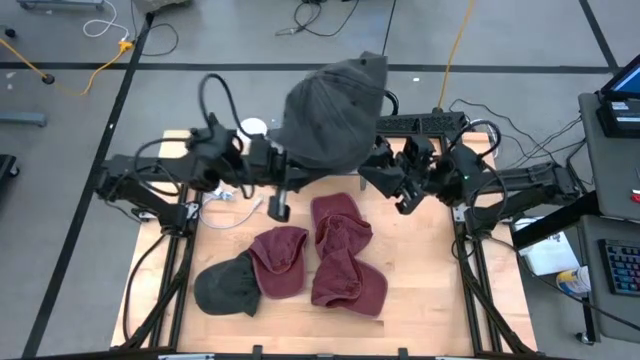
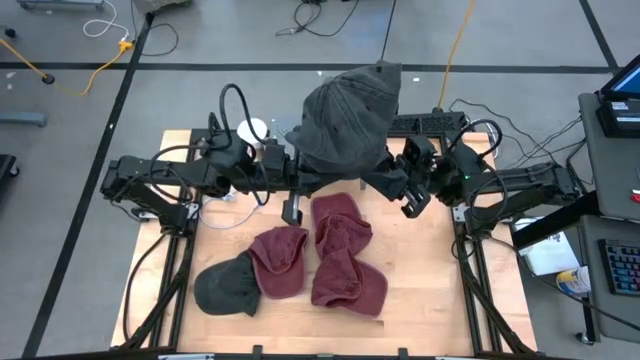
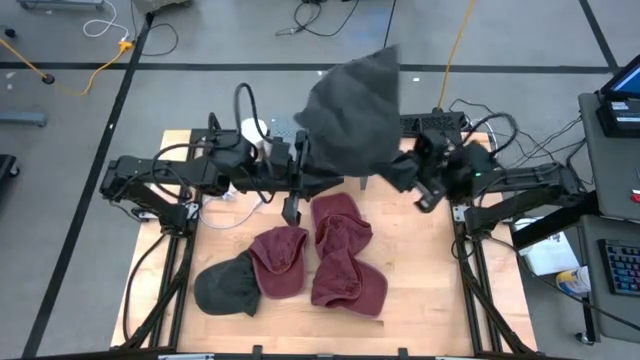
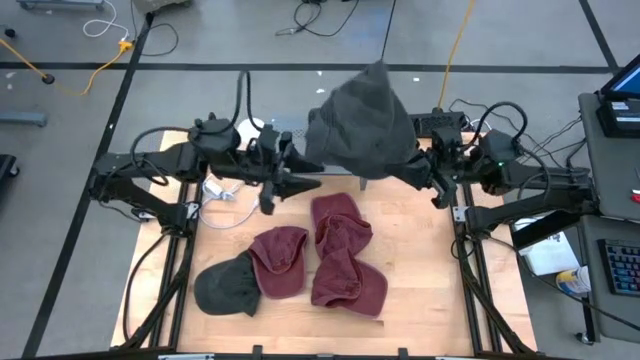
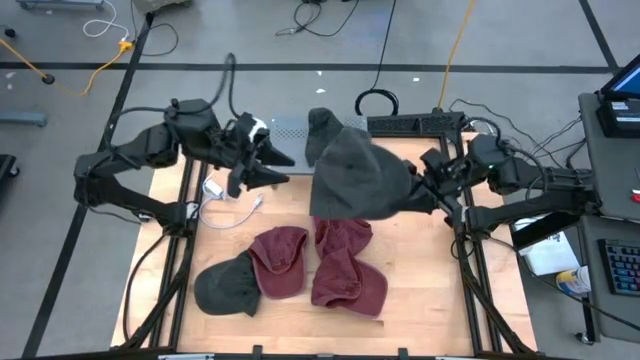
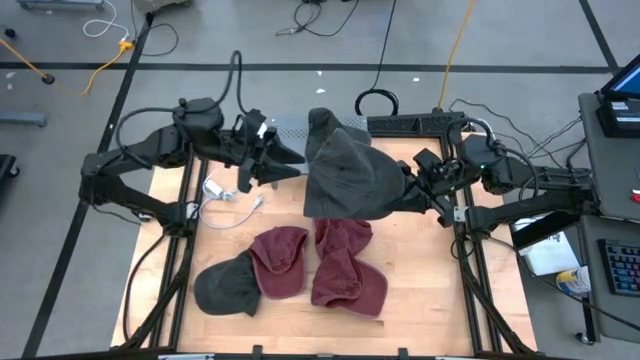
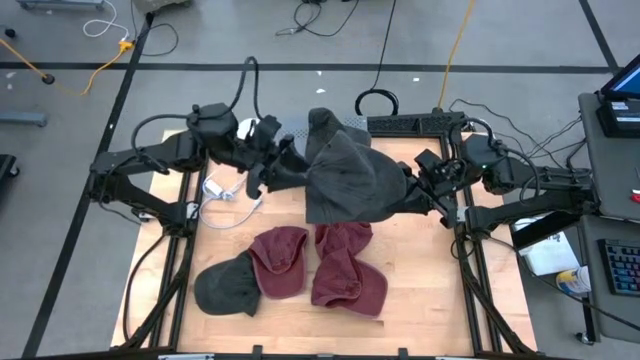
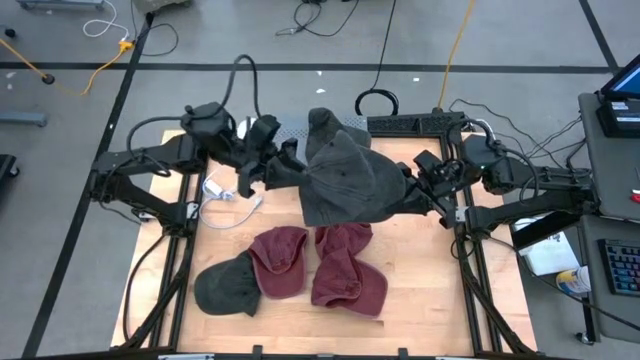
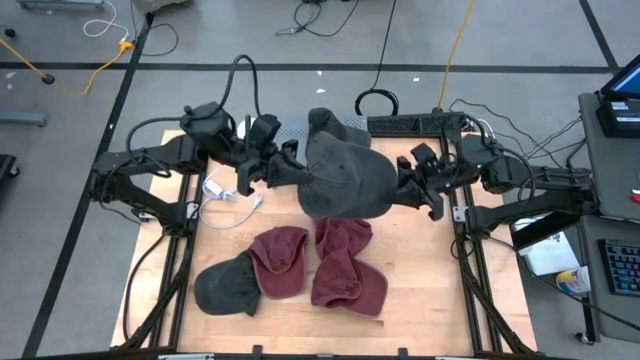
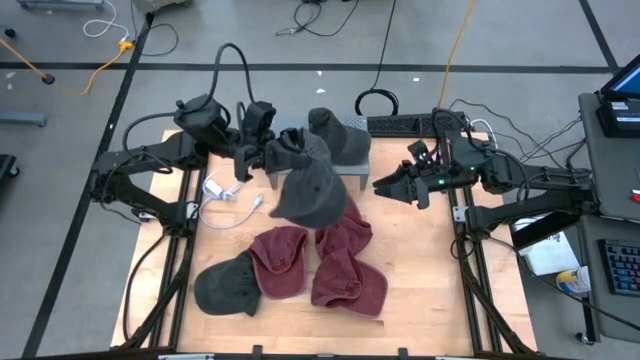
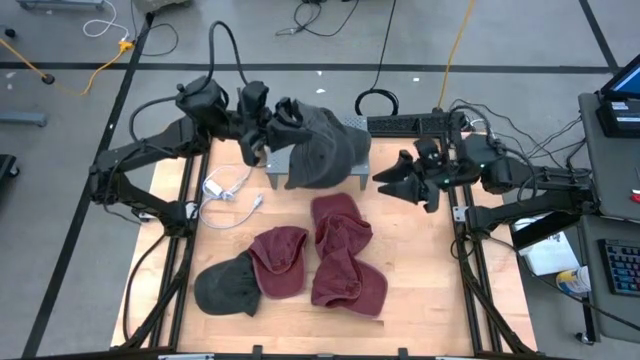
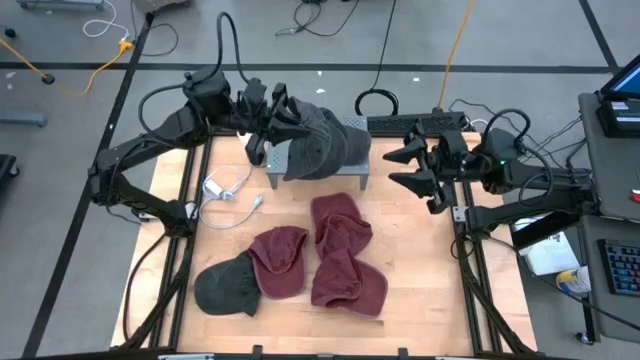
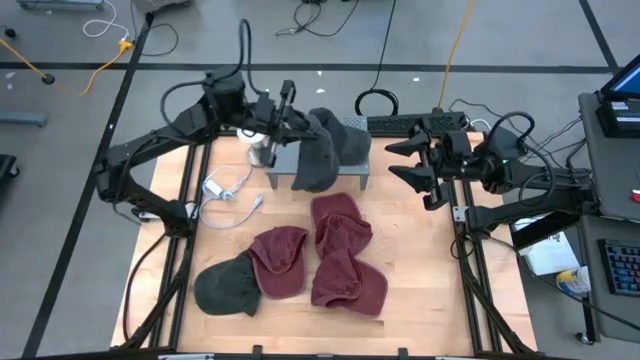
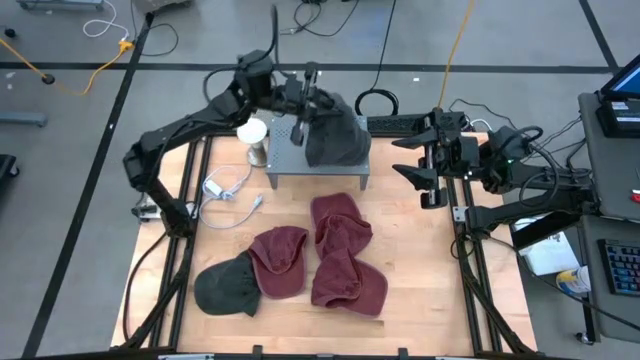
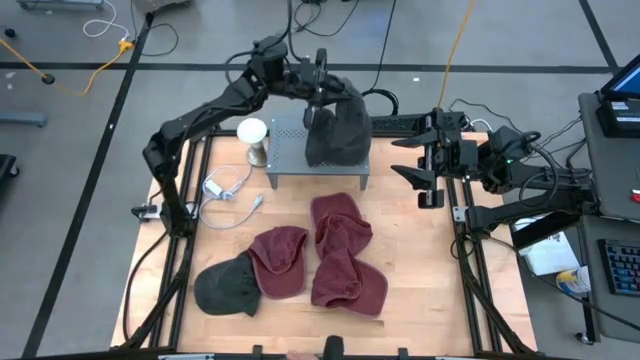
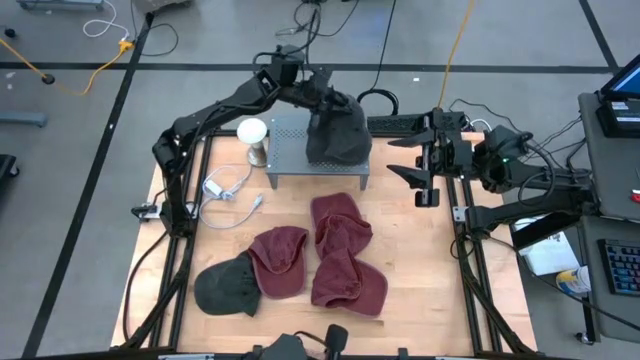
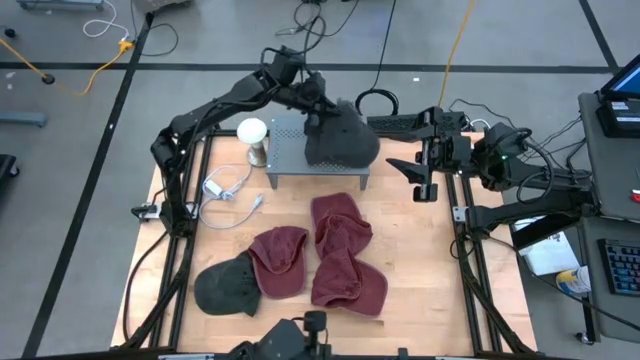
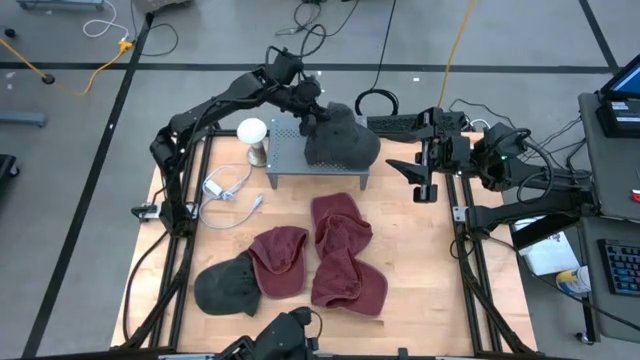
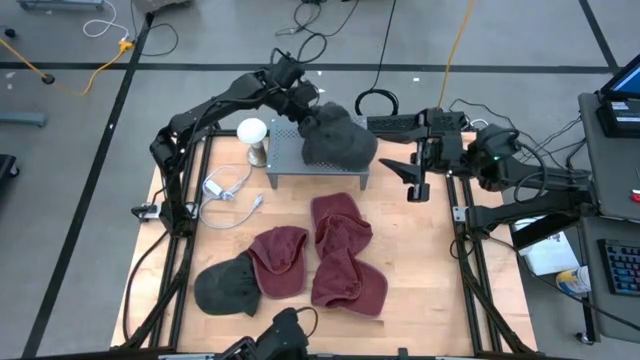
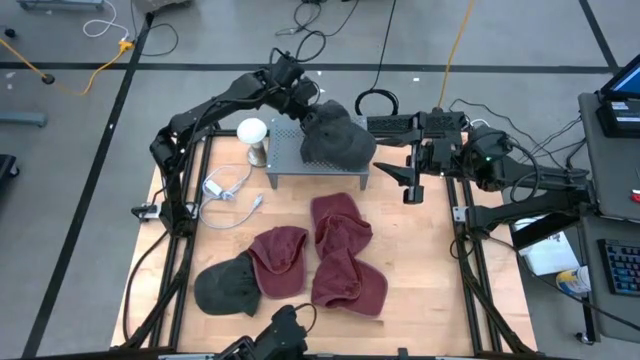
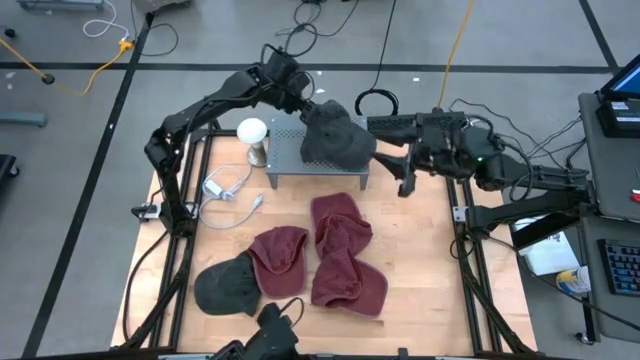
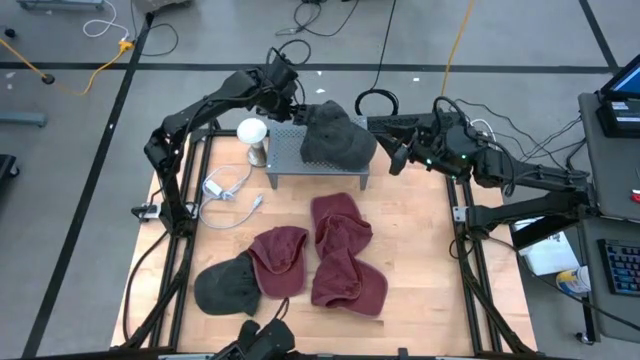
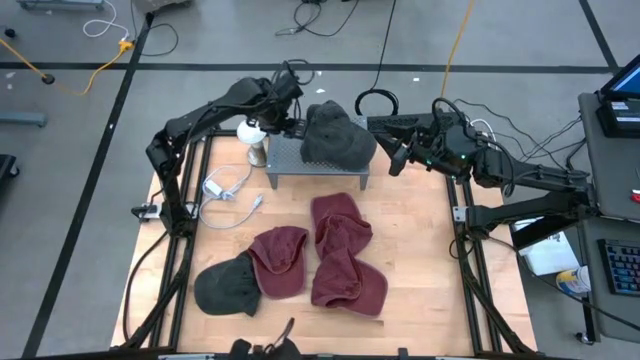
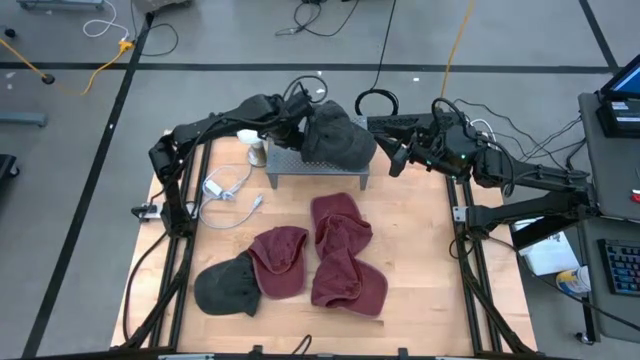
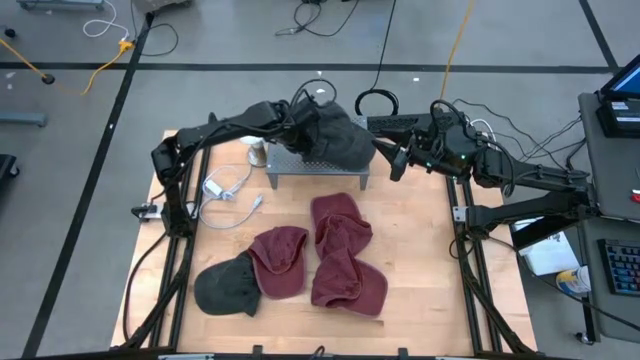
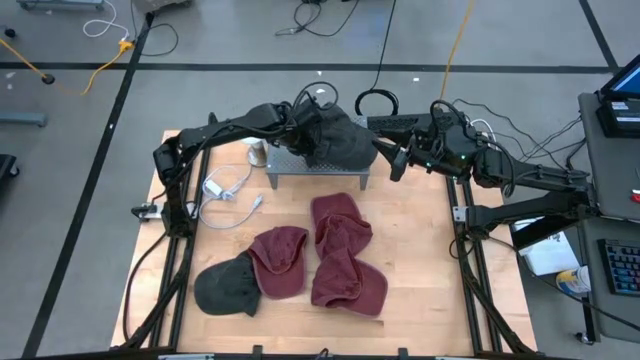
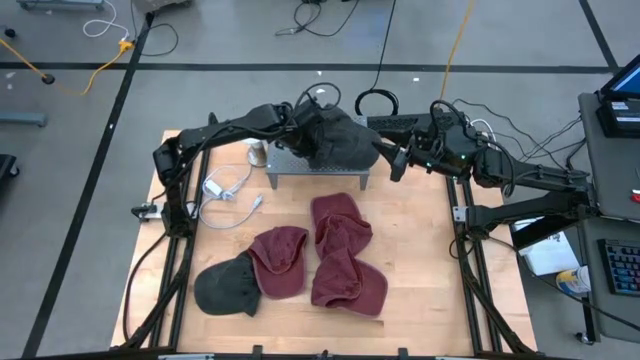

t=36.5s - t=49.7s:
Task: Pick & Place hat
Stack the right black cap on top of the black cap on the shelf
